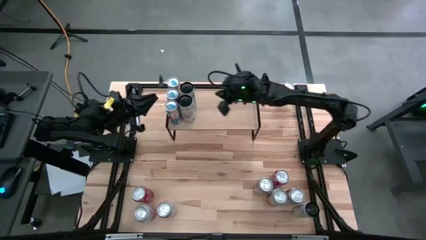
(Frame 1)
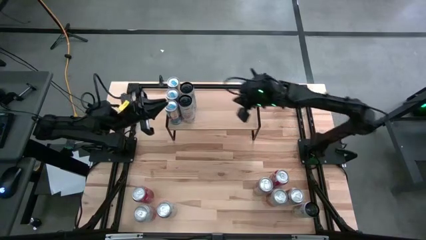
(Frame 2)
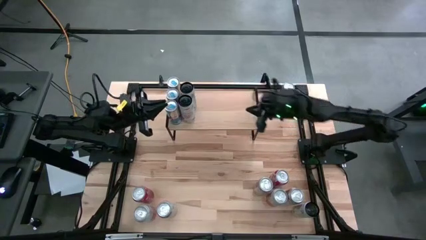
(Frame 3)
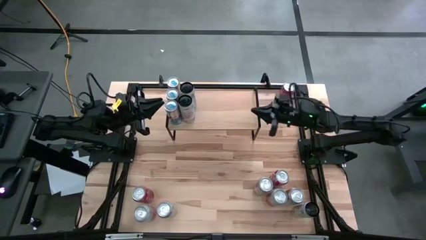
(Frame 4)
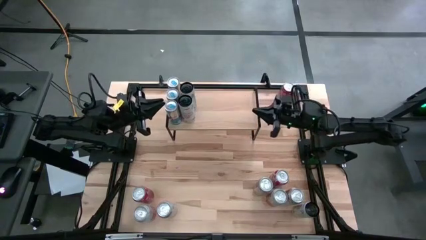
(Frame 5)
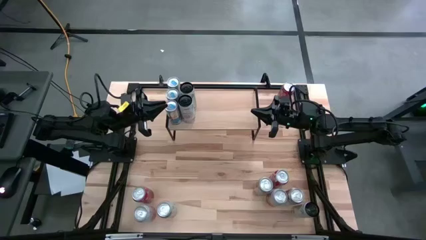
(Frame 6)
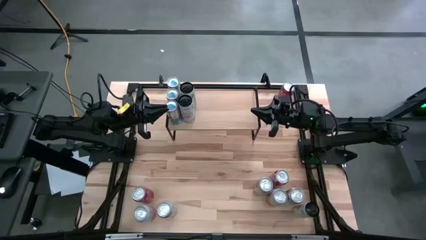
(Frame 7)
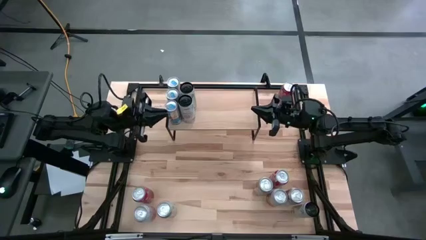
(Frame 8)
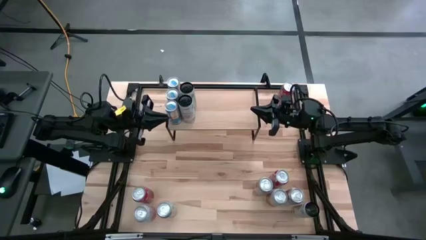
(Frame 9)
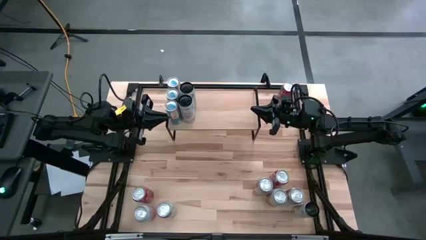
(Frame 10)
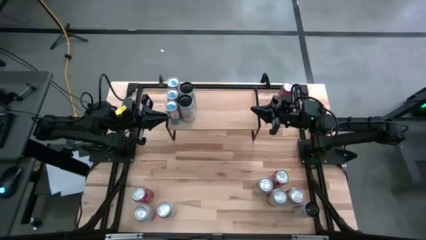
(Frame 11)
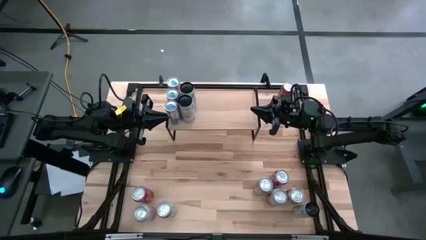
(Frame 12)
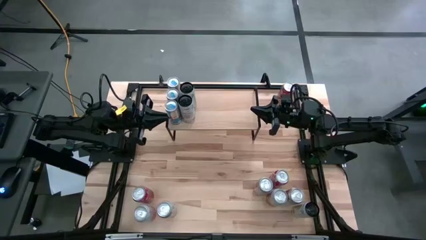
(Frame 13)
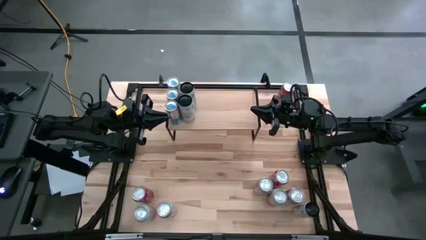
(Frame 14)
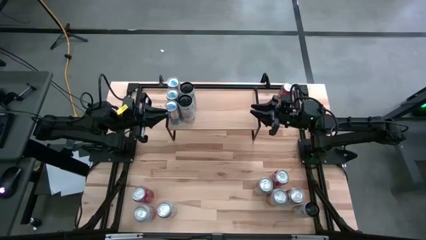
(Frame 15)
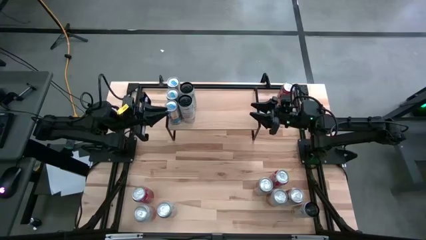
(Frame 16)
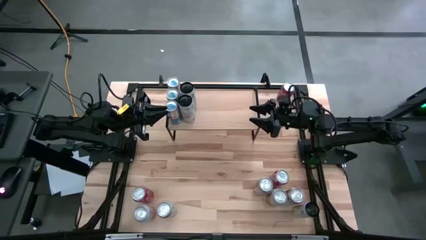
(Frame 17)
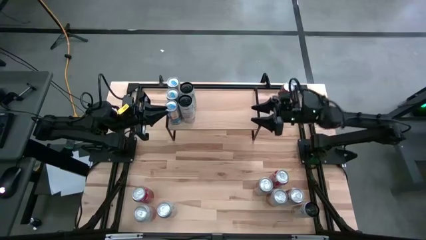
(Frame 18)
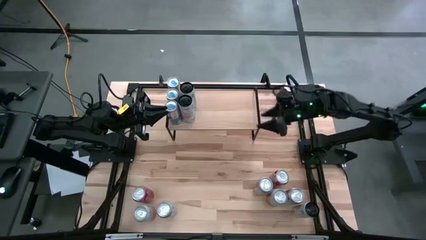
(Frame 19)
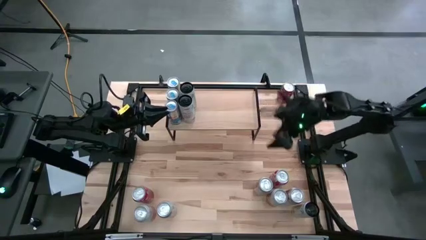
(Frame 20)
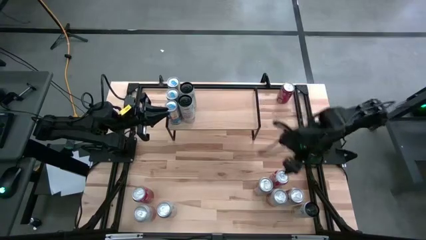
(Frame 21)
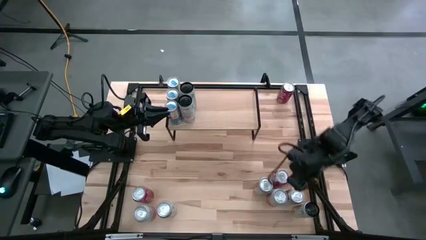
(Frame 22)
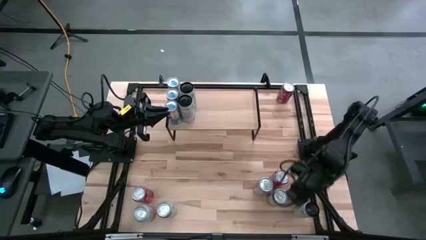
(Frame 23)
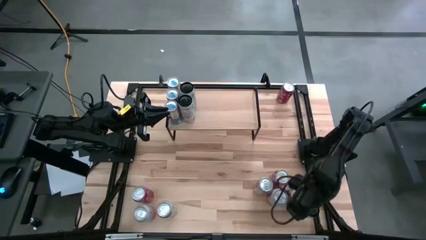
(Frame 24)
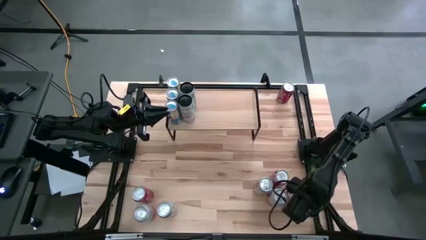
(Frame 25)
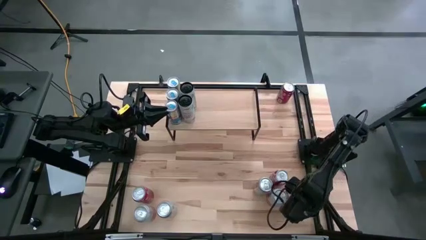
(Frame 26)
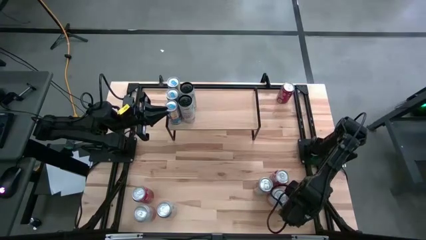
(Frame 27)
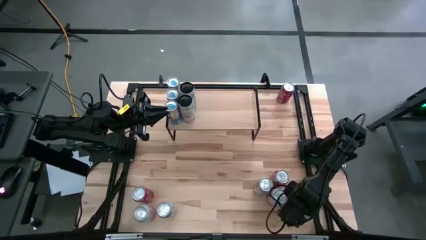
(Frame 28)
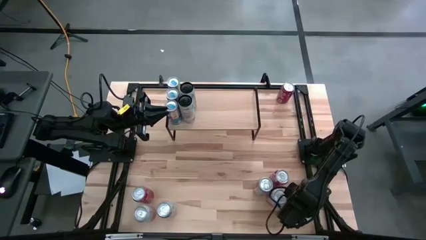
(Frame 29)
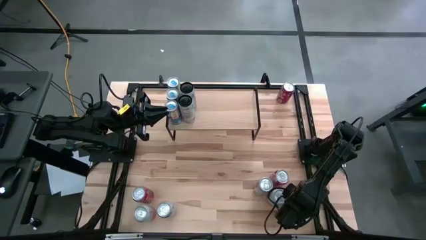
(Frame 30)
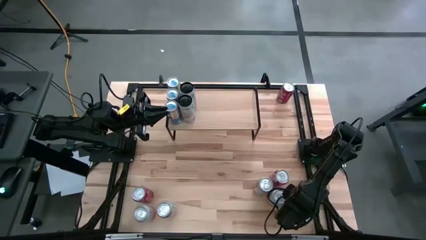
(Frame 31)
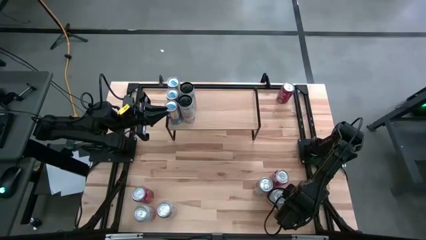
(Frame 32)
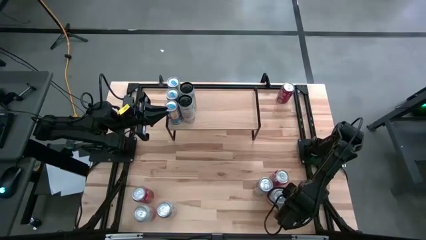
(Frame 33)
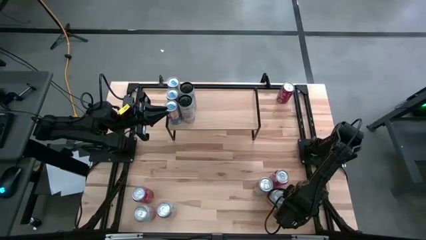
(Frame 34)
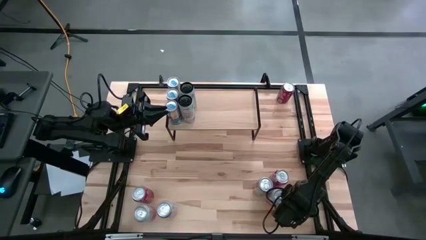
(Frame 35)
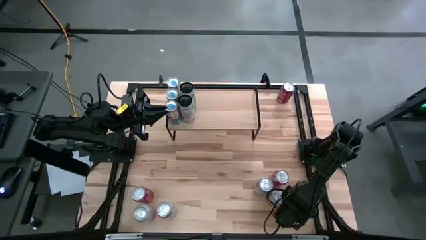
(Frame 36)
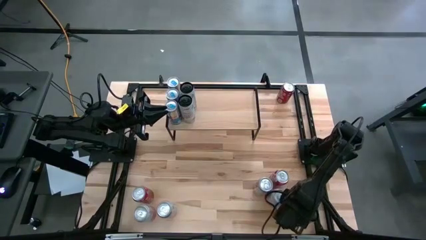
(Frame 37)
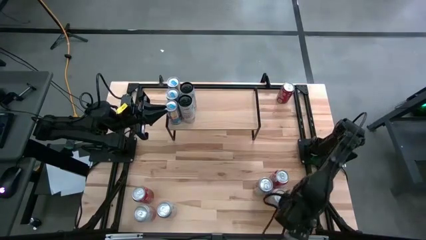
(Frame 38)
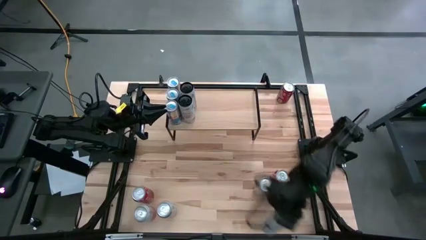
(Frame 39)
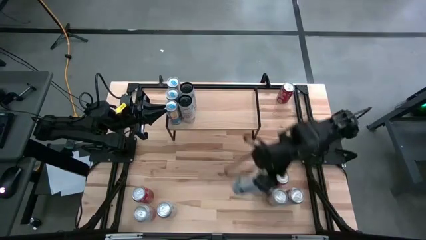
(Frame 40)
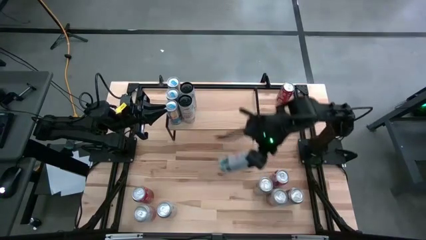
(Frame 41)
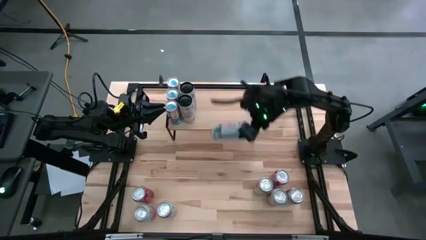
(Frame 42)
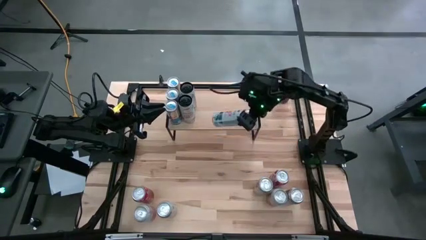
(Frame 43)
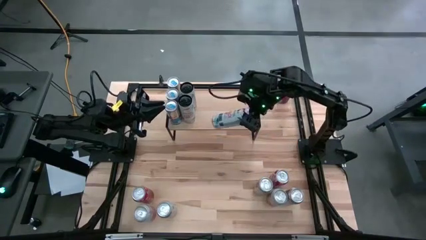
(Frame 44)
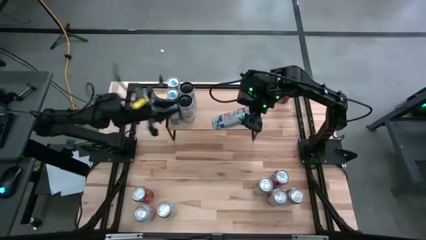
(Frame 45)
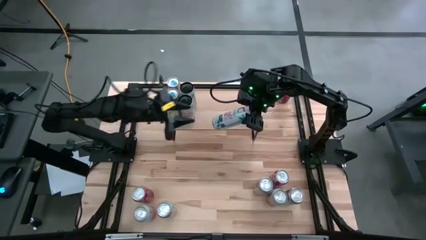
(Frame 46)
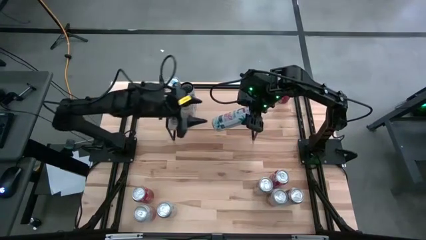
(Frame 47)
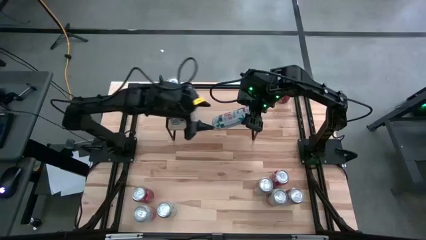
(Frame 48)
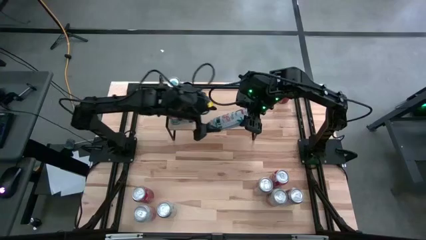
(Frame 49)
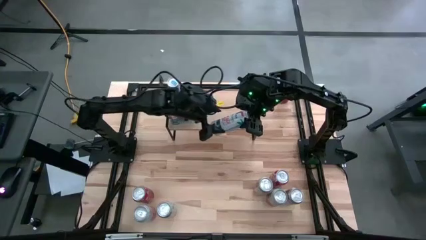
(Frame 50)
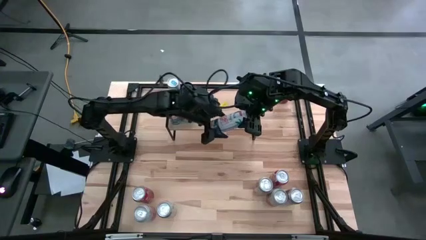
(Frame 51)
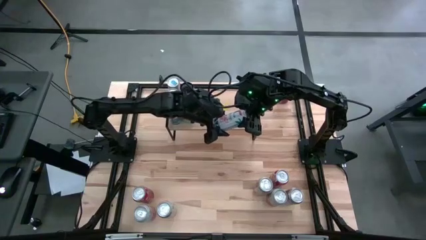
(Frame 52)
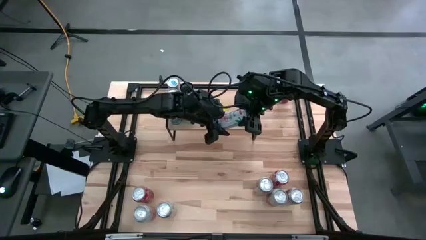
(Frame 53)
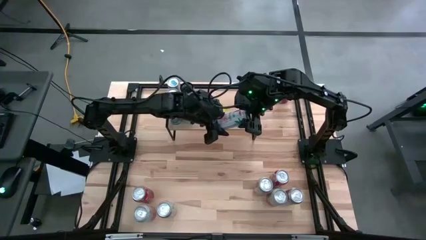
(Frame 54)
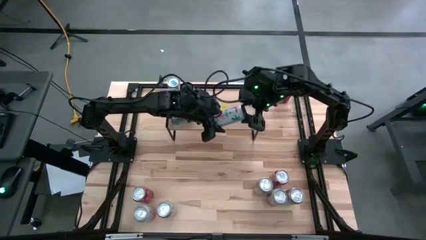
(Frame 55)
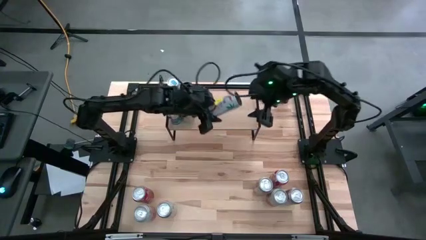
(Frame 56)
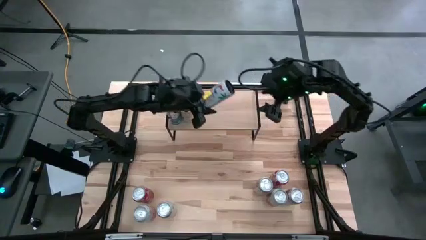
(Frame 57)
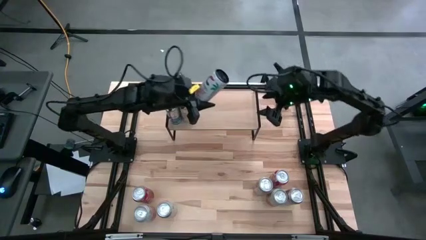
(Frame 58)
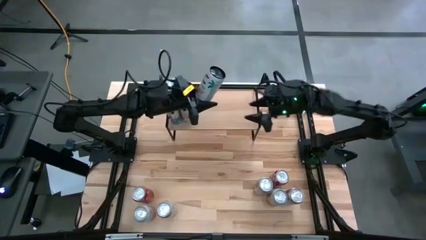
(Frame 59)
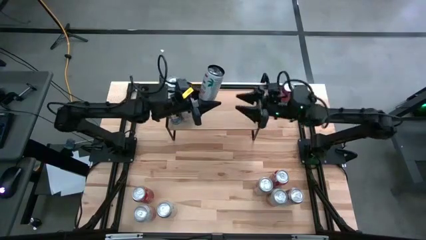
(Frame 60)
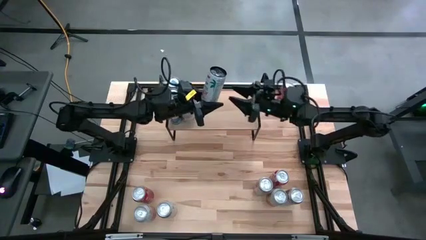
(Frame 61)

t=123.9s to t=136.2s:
Task: Place canned beverage on shelf
Put the white-pink soda can aligned with the other white-pink soda cans on the shelf
